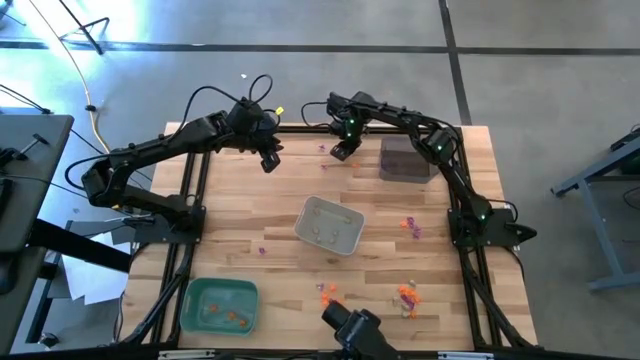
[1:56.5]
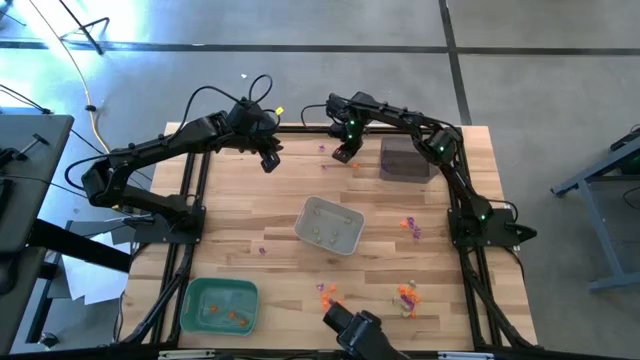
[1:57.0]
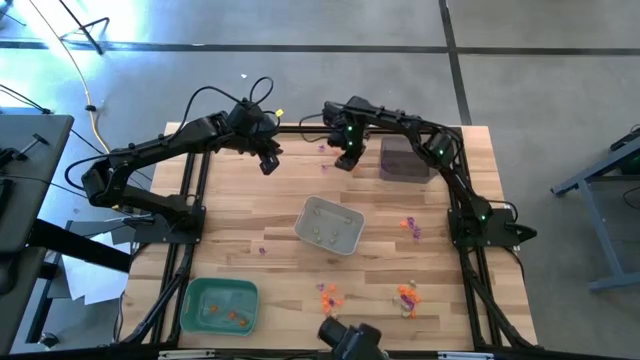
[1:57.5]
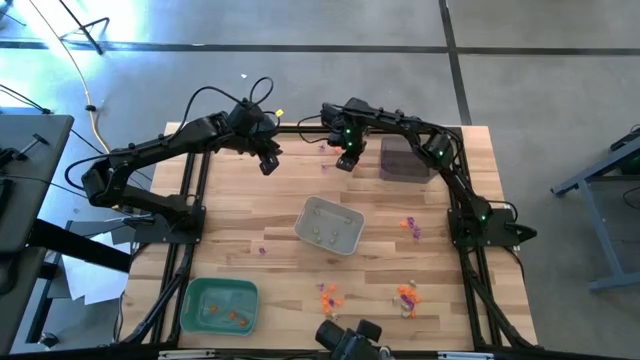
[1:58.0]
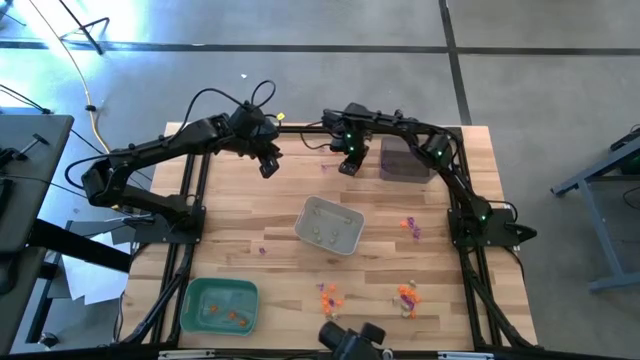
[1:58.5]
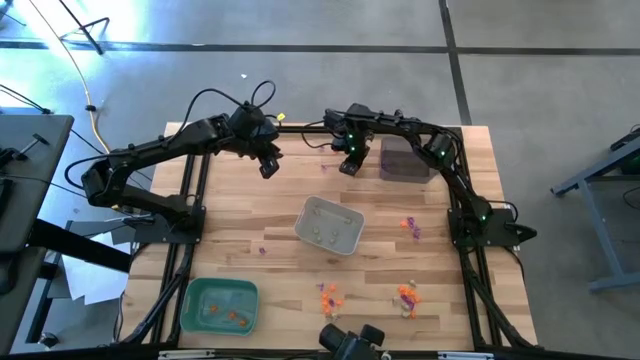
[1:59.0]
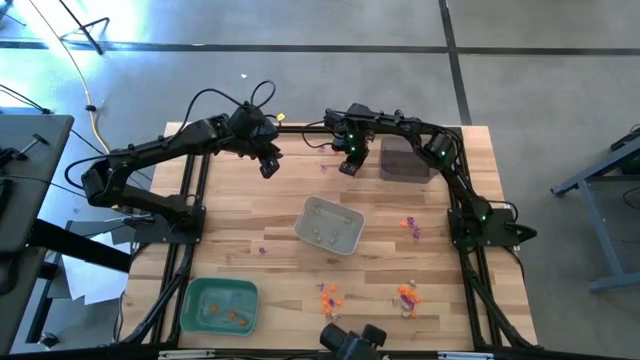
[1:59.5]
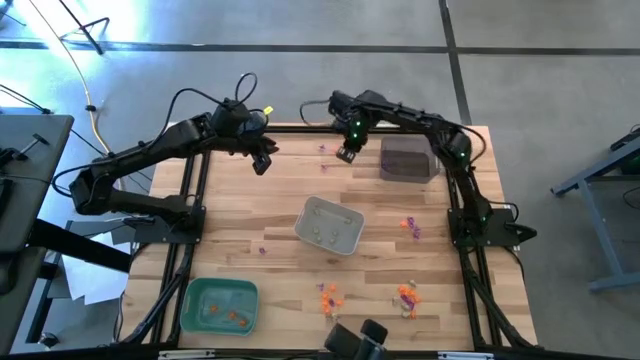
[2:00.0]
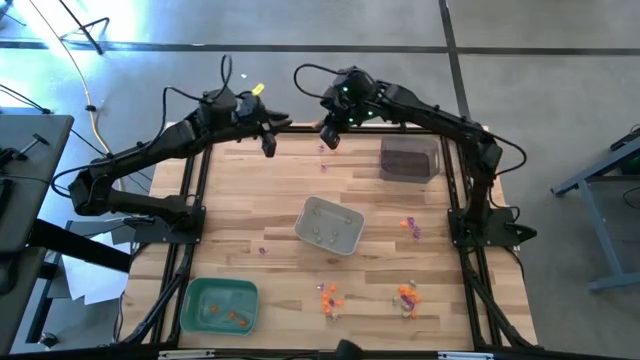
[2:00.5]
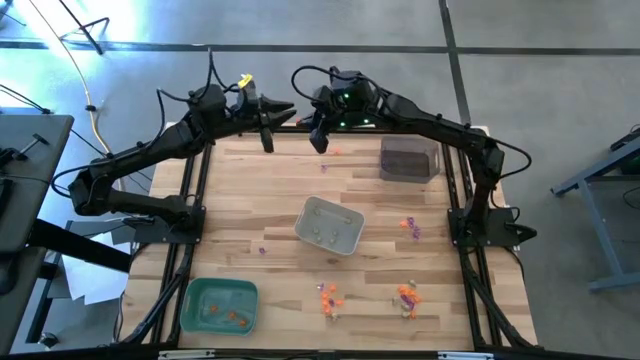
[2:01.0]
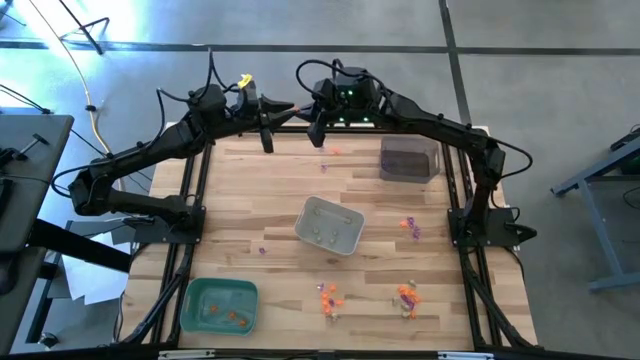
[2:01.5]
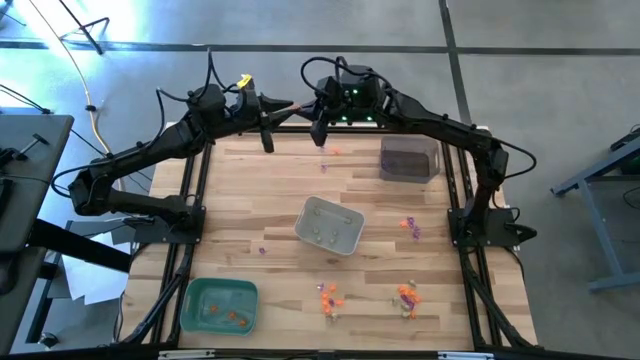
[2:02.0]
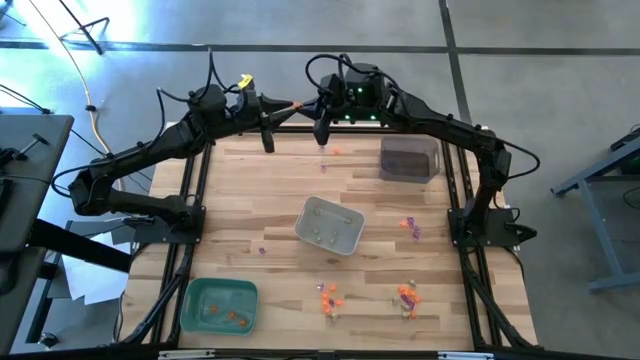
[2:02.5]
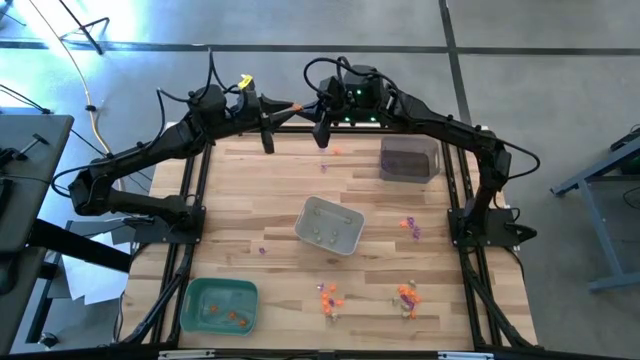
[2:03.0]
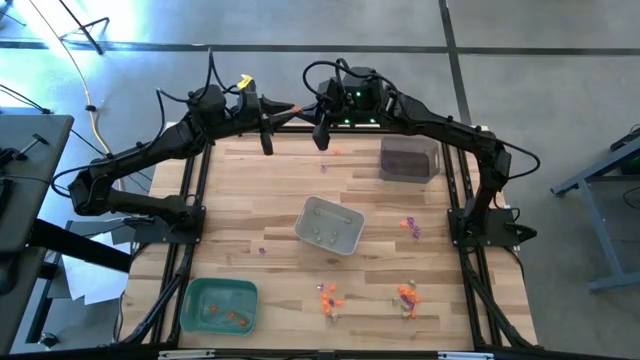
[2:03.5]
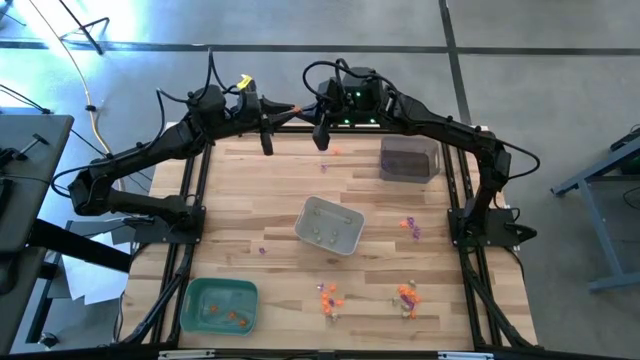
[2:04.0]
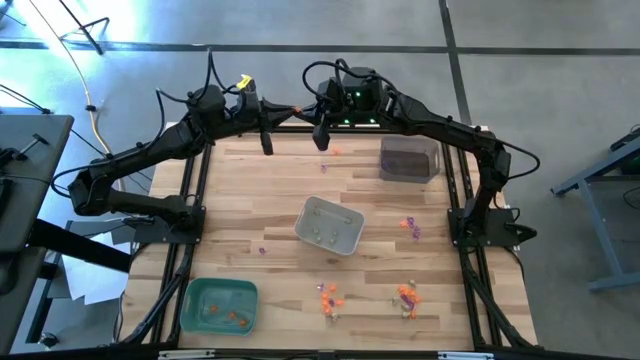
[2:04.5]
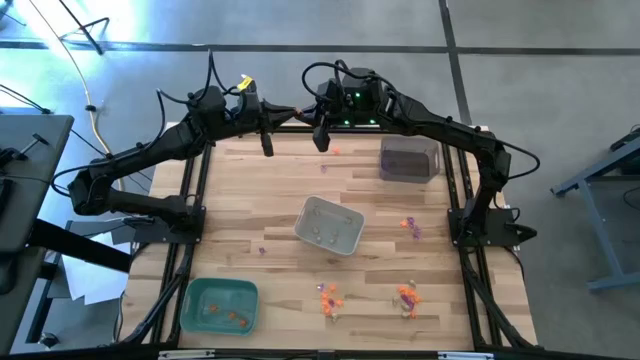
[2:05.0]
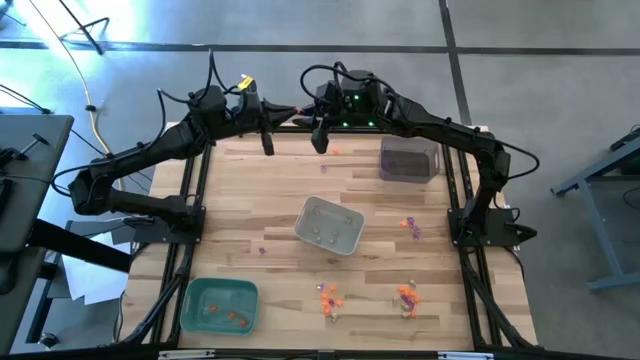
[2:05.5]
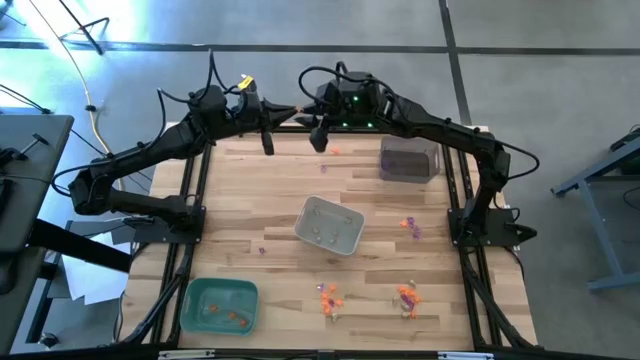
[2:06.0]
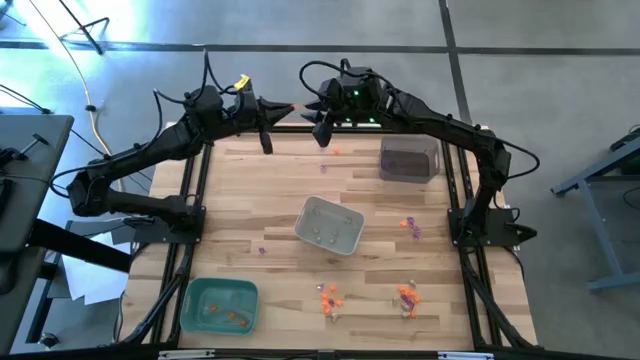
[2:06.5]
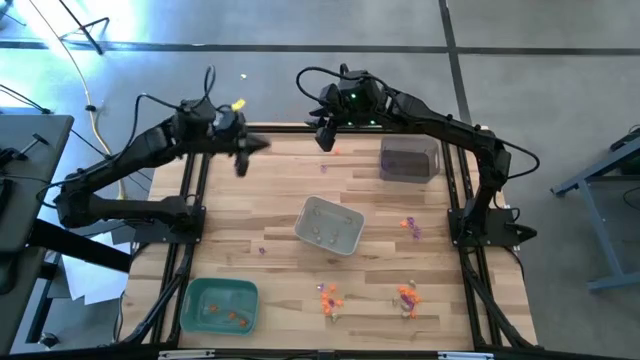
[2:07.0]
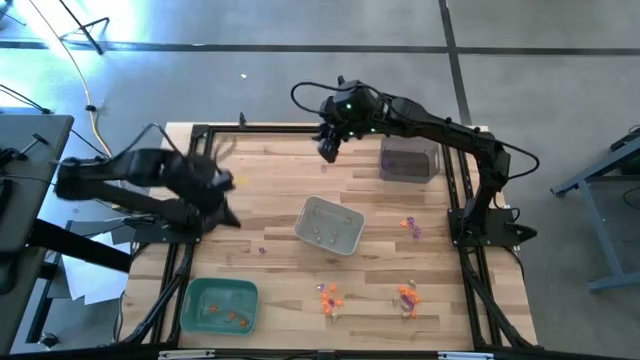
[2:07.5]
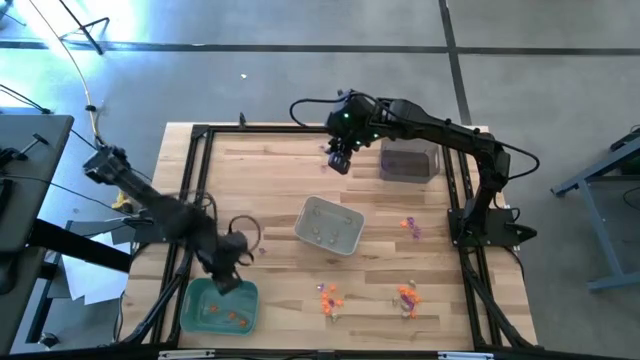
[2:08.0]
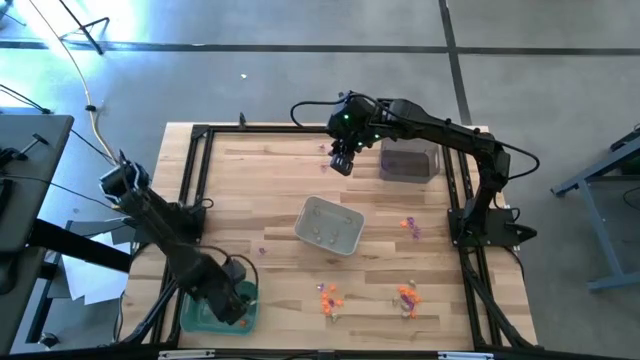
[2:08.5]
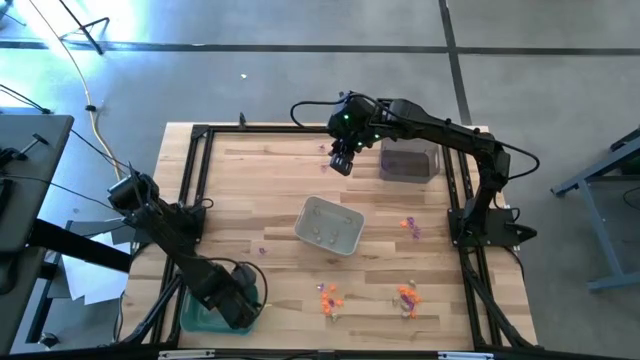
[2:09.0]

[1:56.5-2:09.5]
Task: Sort Halloween decoration
Put the orange spider toy into the green bin

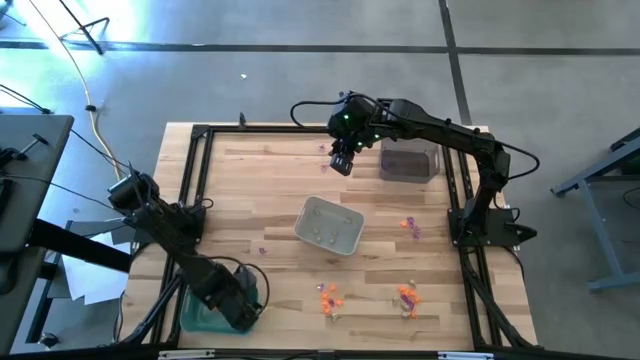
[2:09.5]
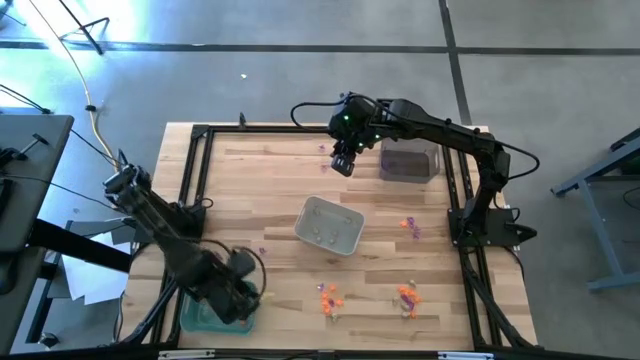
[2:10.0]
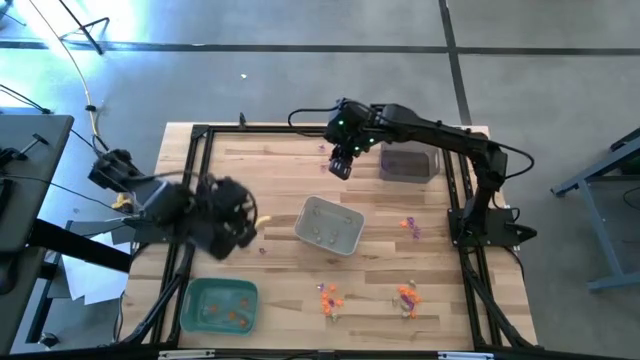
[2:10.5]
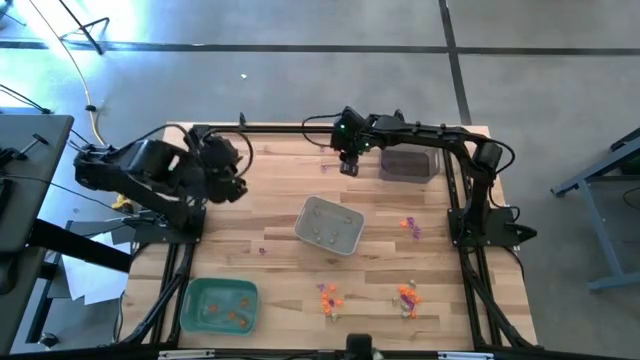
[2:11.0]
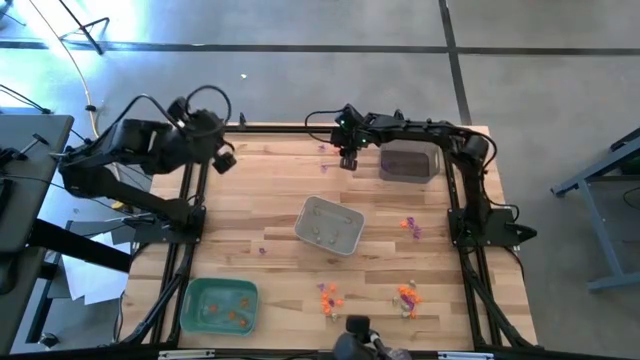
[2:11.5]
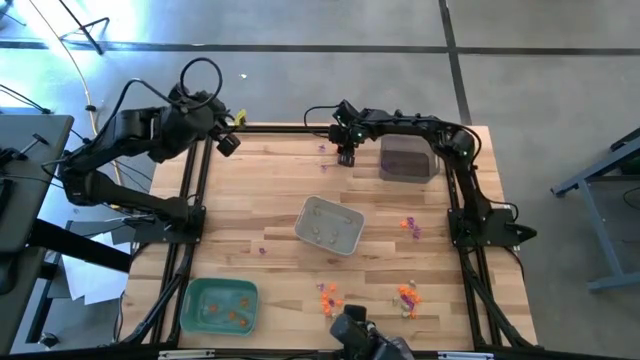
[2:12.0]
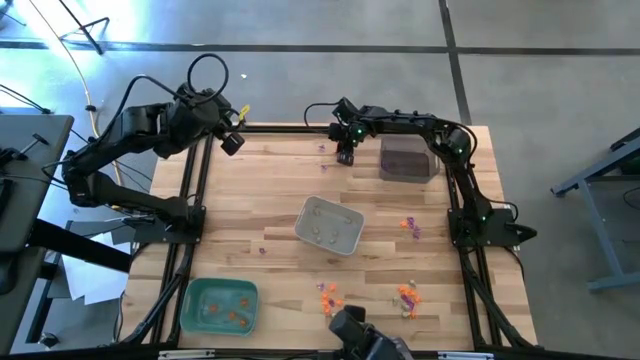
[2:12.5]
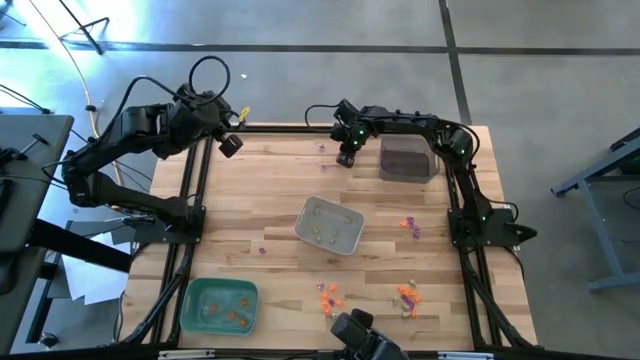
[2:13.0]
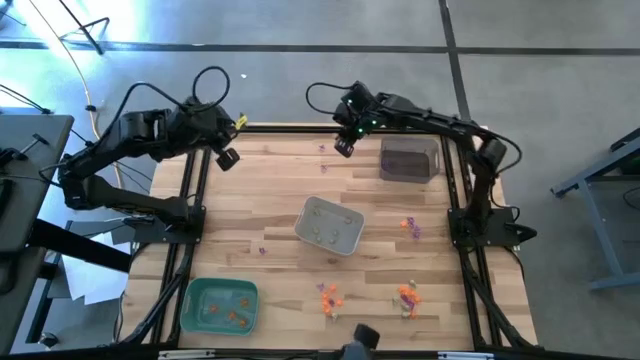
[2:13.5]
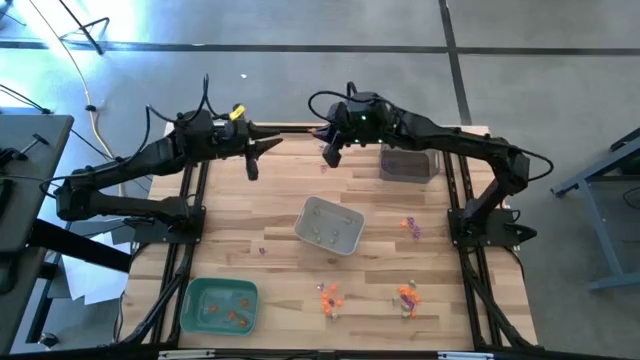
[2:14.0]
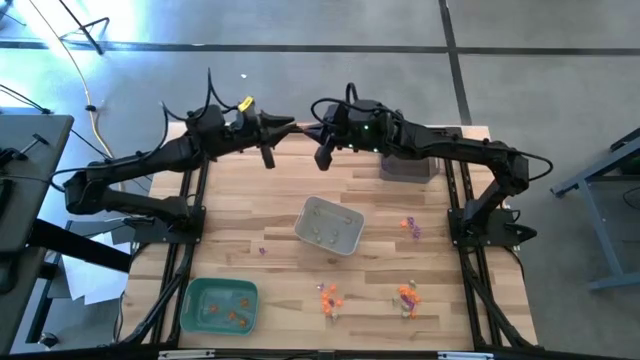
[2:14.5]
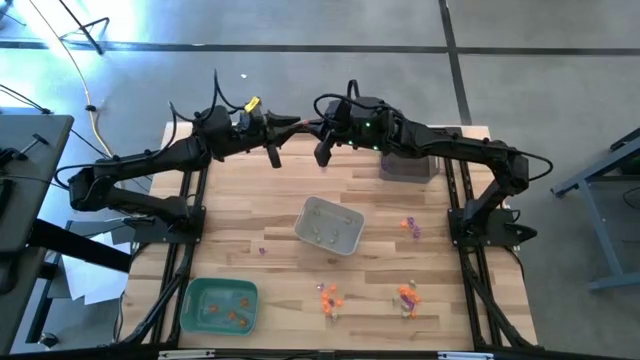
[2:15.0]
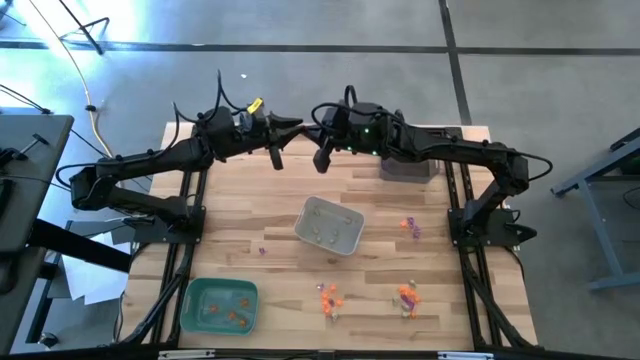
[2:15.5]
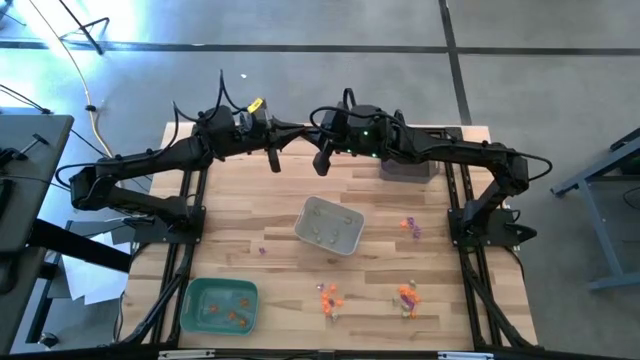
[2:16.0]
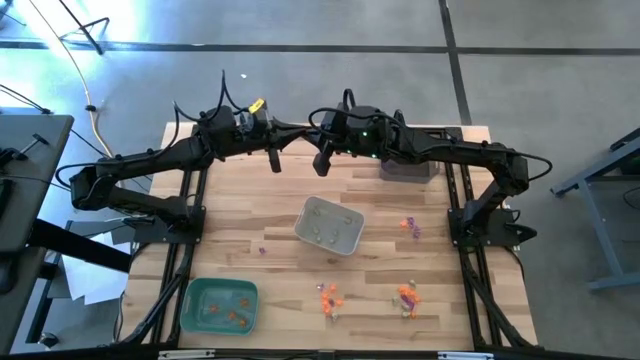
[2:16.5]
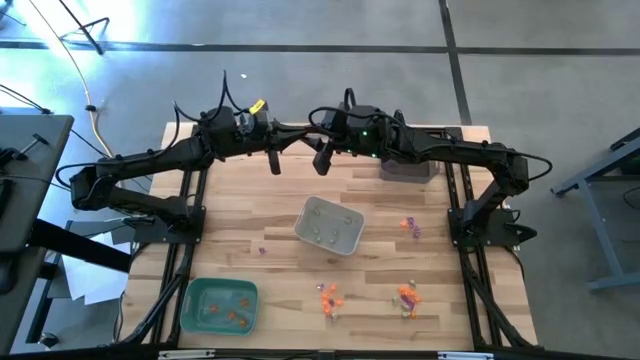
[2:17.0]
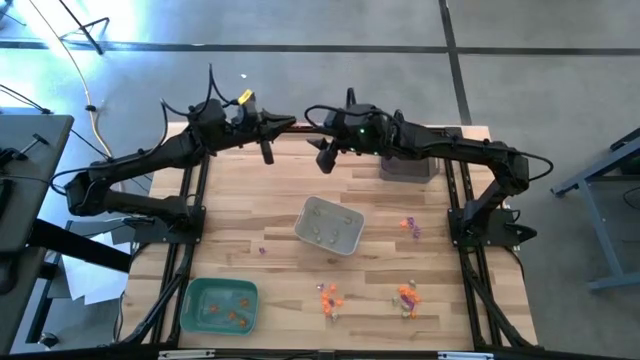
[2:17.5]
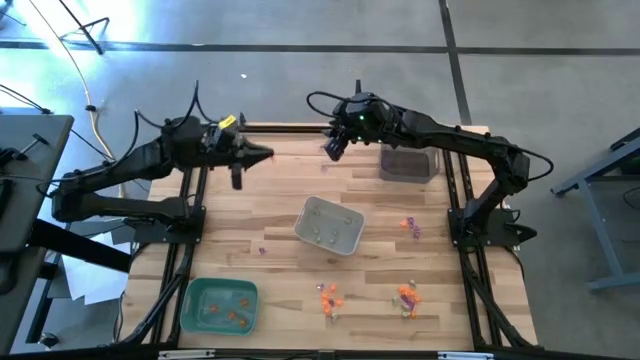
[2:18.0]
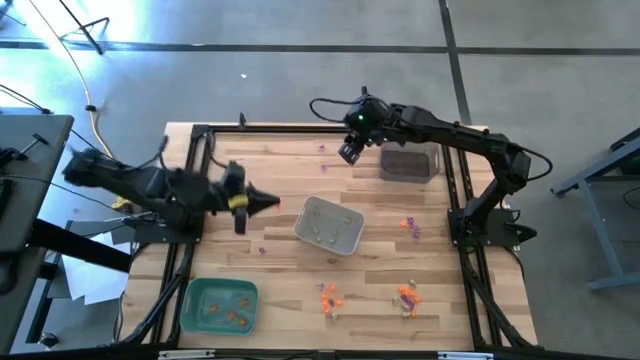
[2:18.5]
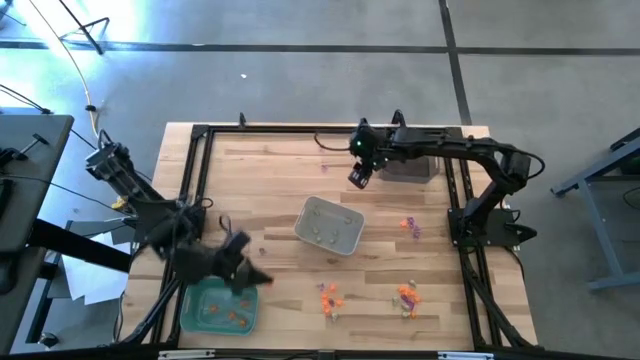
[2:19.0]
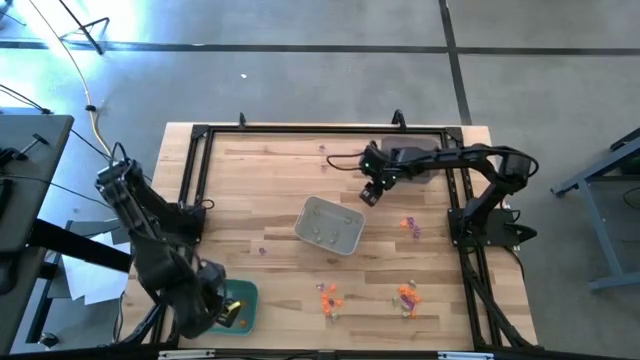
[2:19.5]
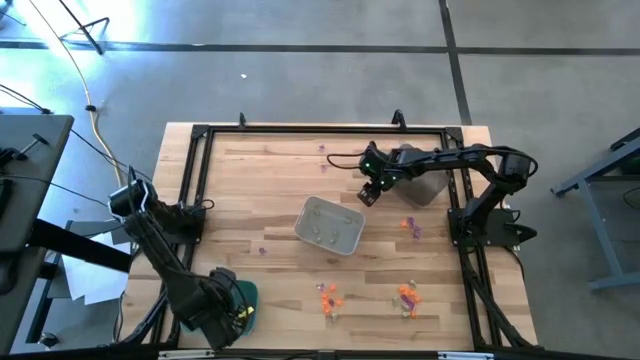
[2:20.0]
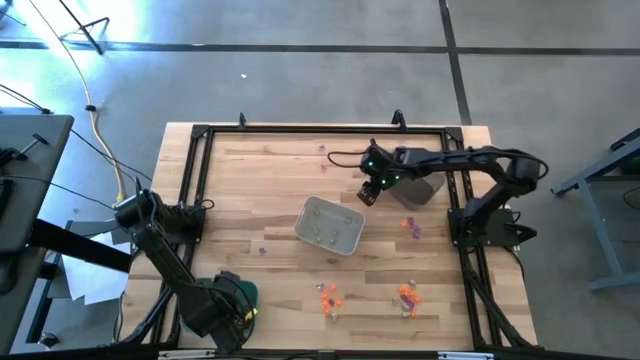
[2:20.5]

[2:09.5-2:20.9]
Put the orange spider toy into the green bin
